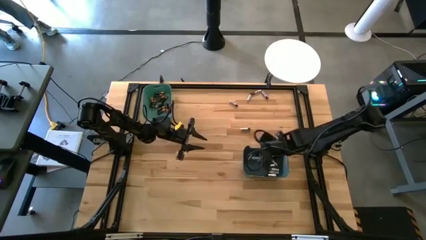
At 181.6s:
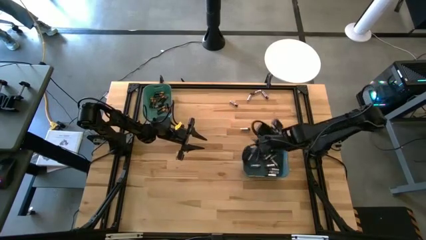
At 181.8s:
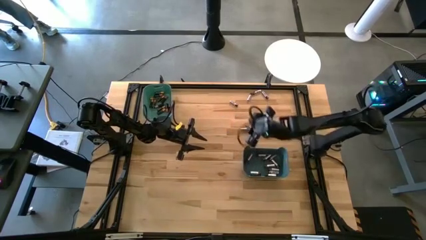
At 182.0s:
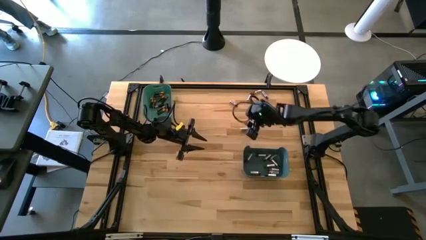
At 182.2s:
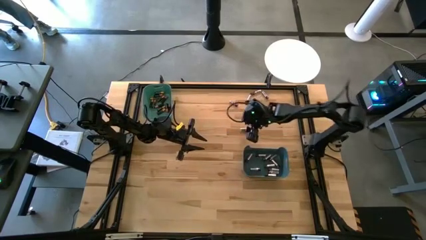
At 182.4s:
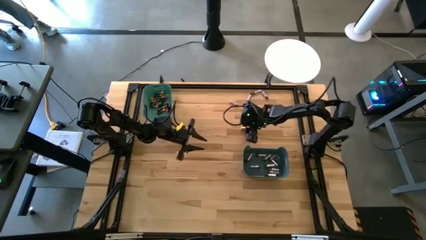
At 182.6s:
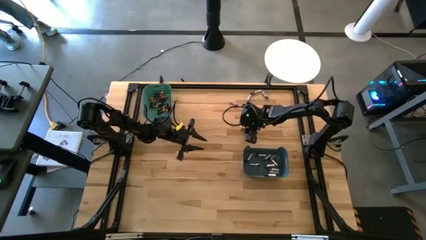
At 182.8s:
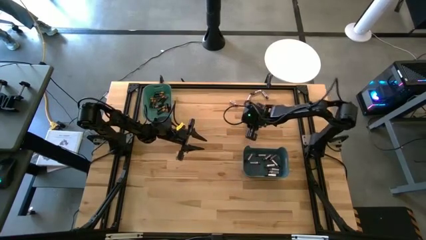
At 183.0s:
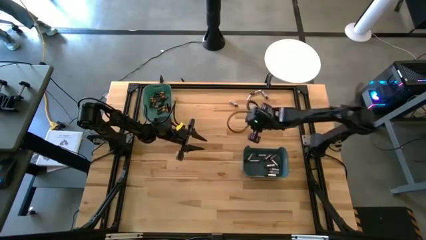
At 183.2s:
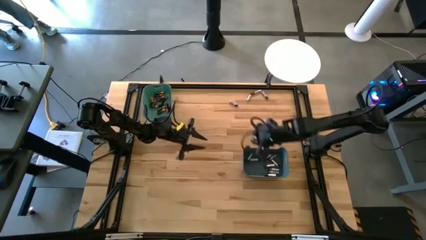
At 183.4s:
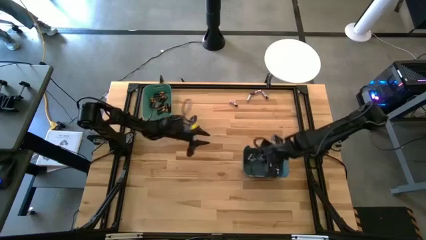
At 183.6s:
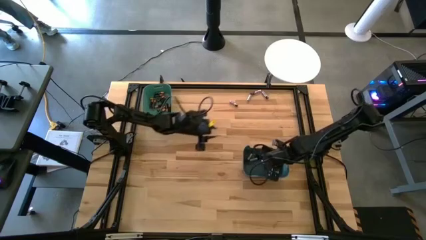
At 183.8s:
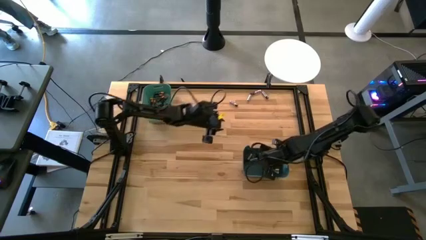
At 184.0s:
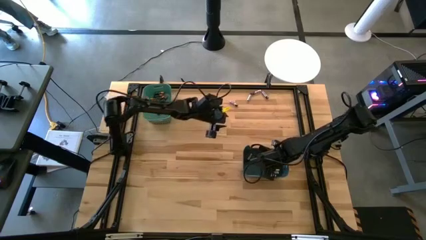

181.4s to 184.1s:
Task: Sort batteries
Put the silver battery into the blue bin

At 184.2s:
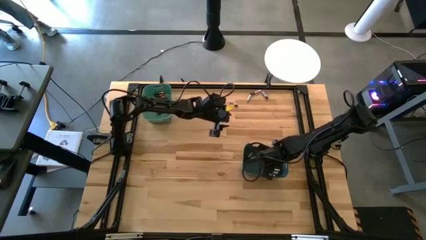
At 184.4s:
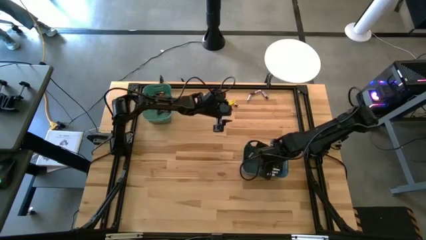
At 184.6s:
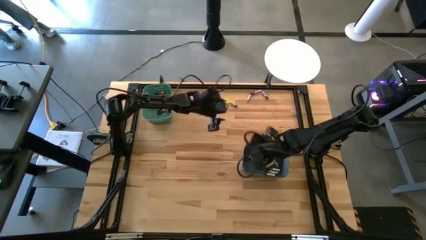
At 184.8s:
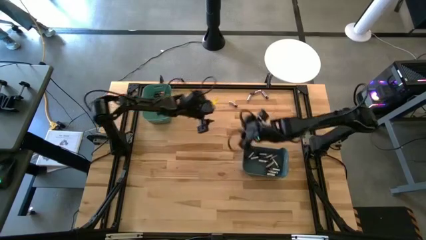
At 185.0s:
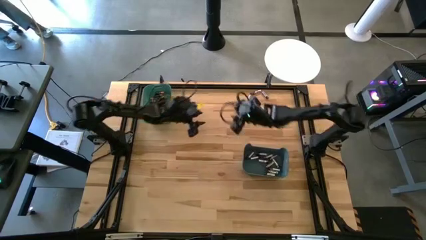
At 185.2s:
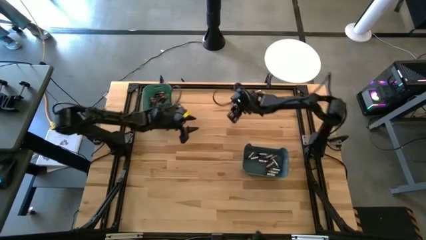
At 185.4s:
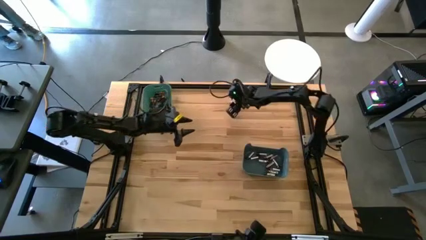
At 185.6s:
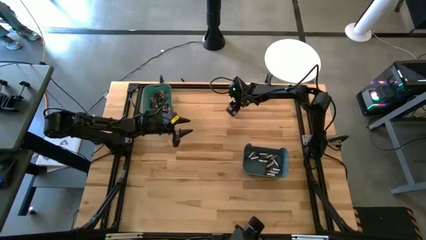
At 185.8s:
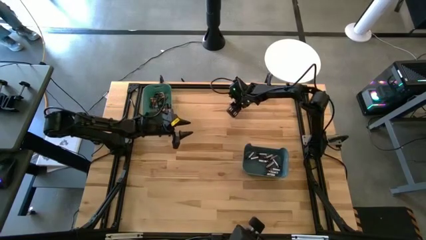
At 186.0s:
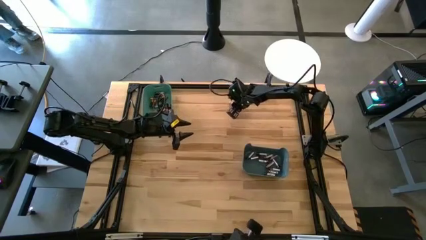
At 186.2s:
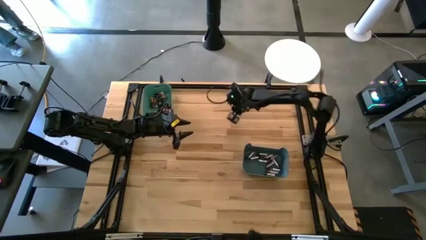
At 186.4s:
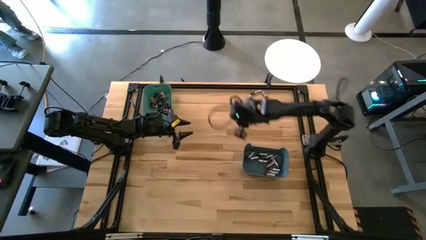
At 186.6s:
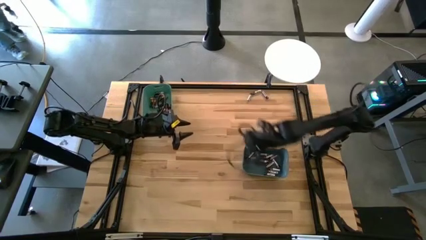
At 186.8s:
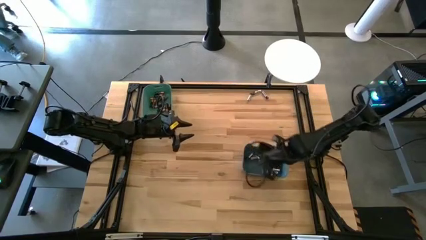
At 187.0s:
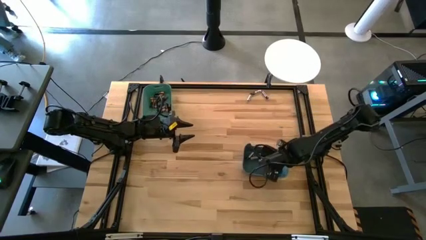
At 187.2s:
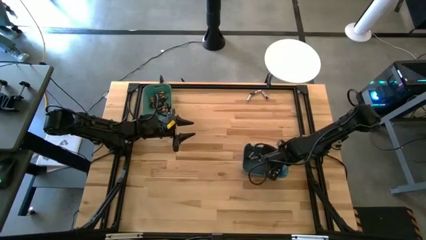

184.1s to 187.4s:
Put the silver battery into the blue bin

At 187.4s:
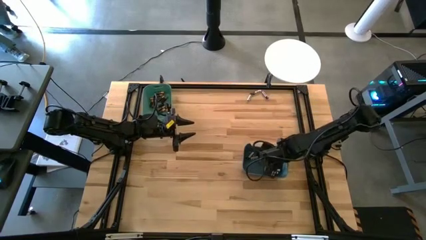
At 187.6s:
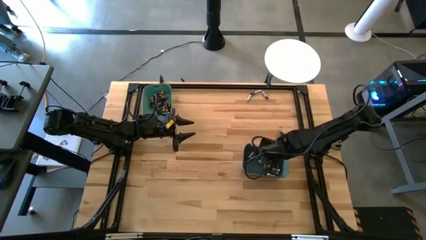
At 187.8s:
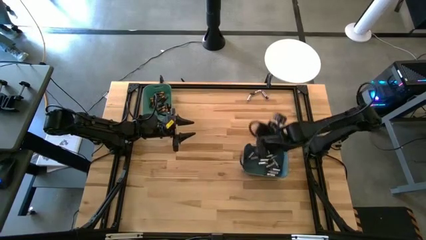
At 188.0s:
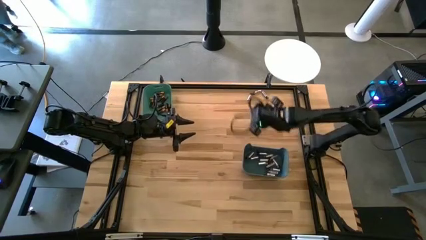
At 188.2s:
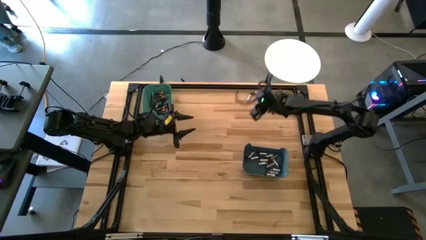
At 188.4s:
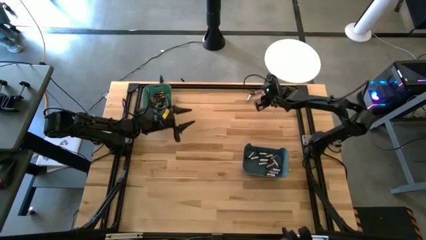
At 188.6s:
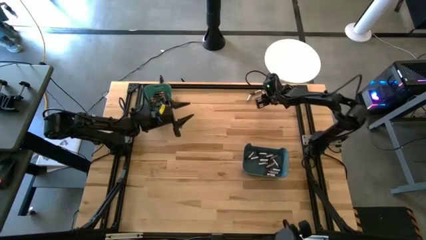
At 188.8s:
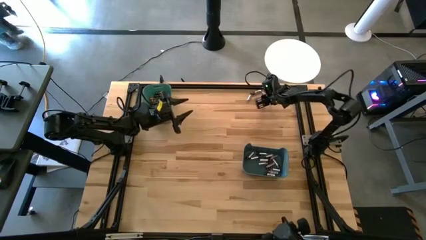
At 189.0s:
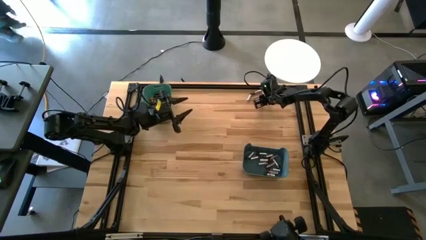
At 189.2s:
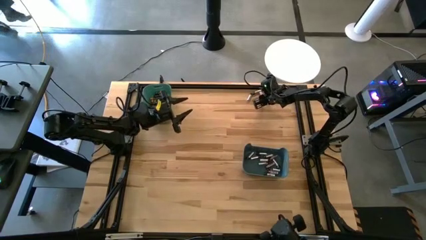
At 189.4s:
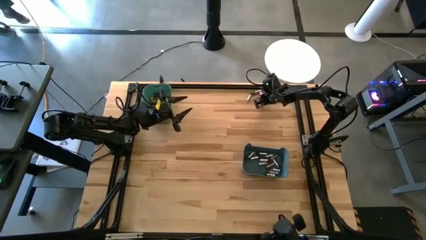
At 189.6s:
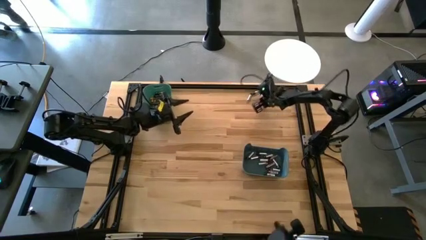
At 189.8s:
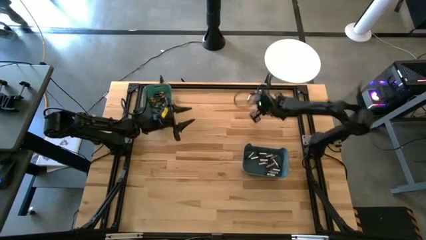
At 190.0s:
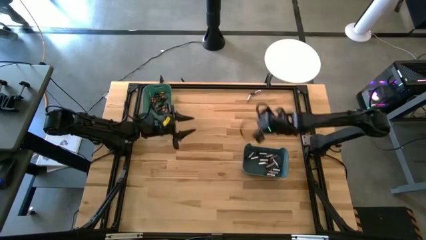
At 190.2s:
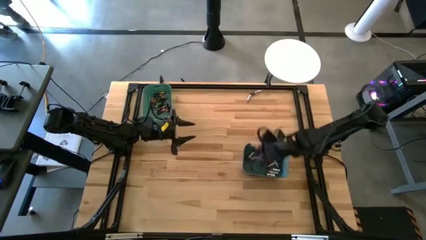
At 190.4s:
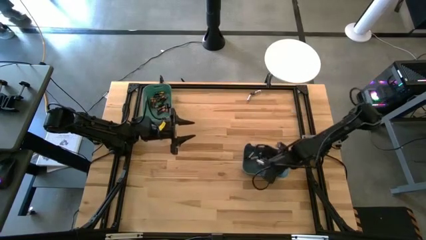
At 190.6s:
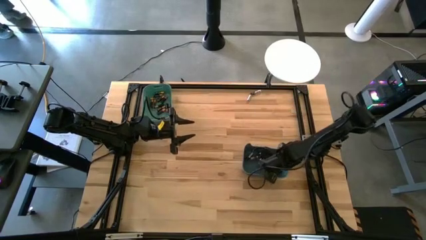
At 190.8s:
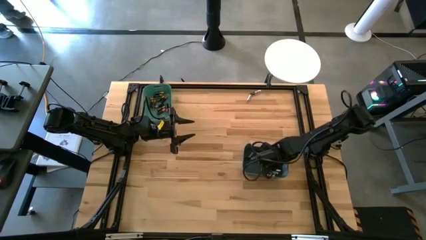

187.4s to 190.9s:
Put the silver battery into the blue bin

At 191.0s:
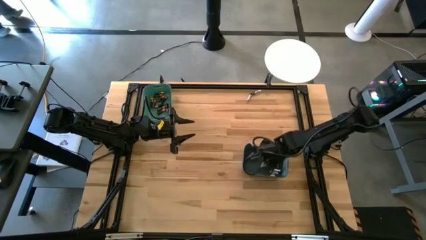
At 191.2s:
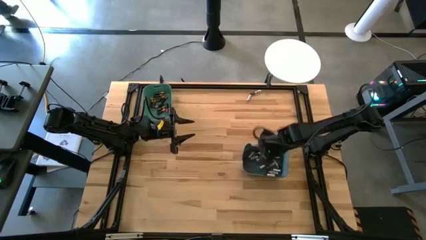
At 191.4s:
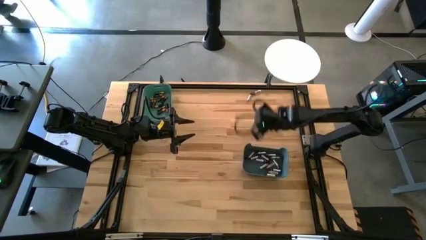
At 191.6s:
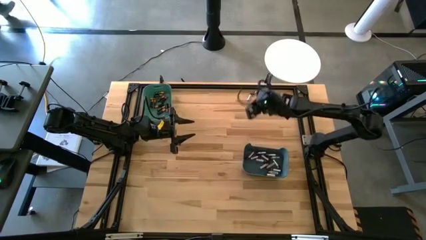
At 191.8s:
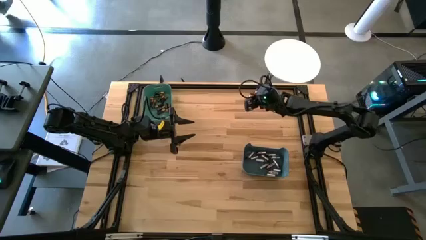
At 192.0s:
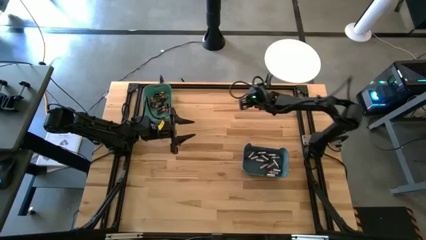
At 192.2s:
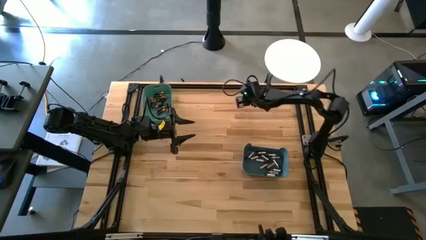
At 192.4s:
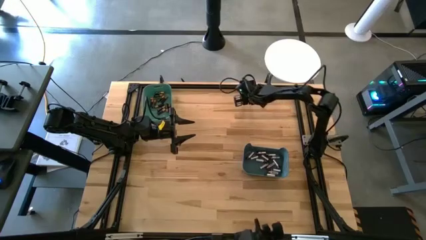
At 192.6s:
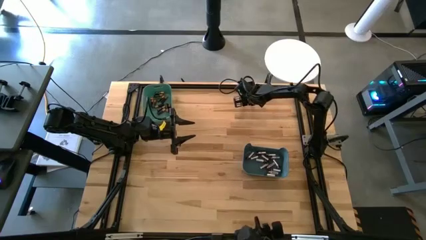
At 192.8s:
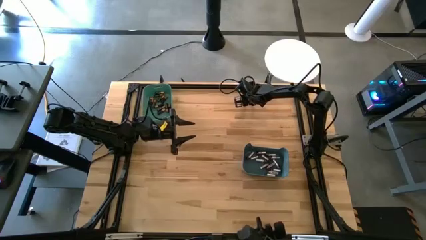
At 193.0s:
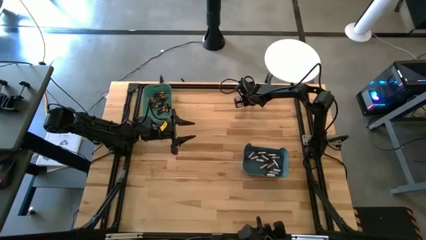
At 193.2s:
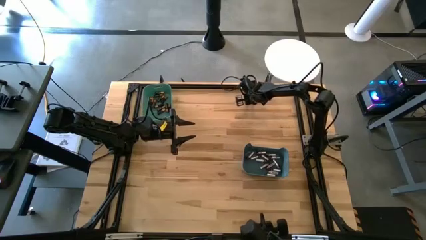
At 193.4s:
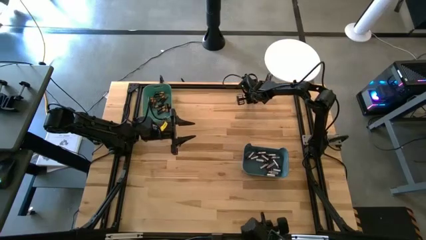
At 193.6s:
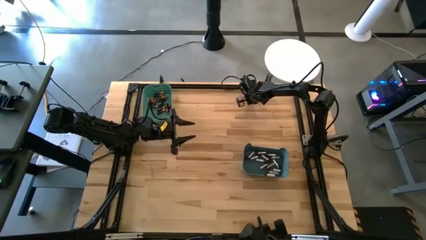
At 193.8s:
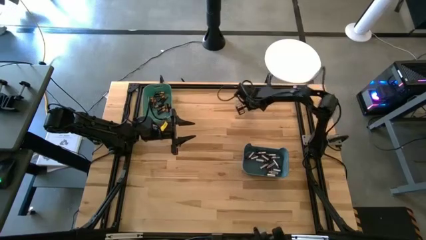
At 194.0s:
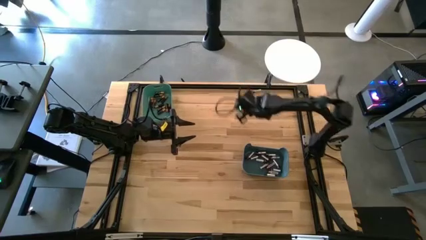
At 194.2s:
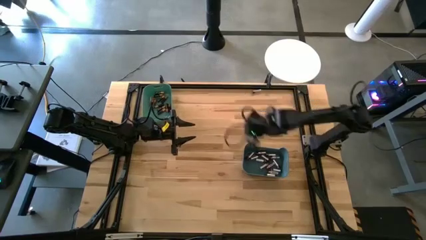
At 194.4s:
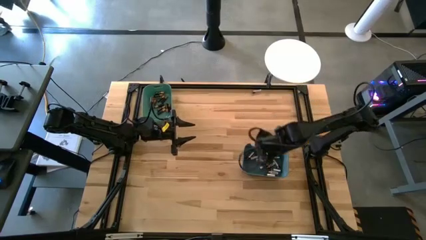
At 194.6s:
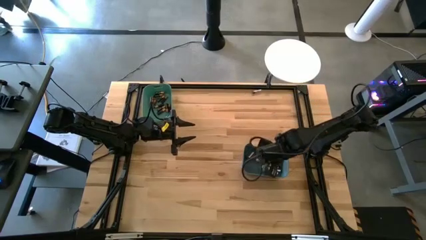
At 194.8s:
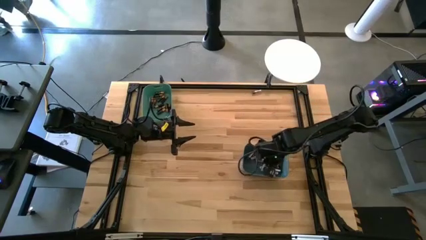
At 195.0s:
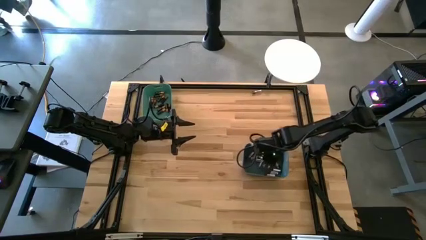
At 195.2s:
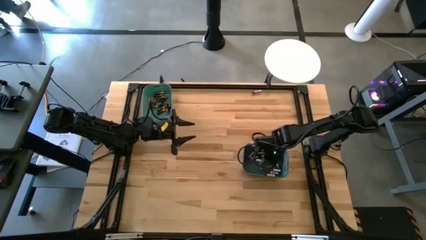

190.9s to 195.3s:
Put the silver battery into the blue bin

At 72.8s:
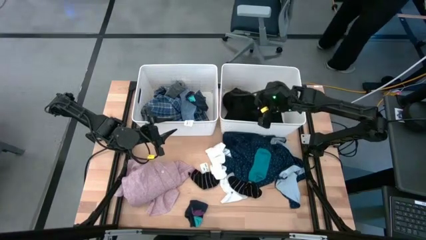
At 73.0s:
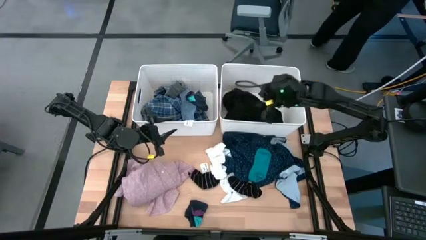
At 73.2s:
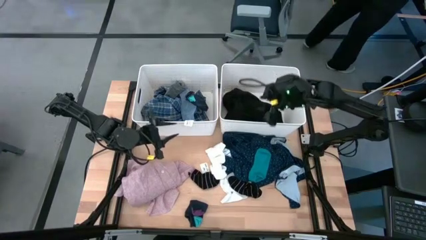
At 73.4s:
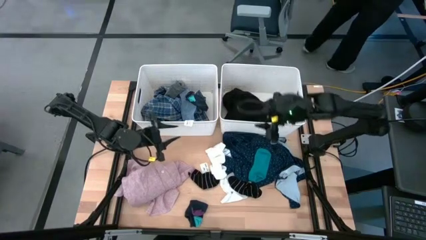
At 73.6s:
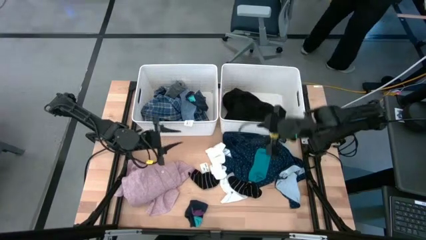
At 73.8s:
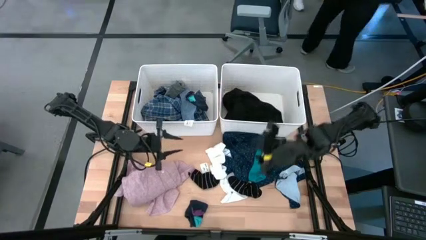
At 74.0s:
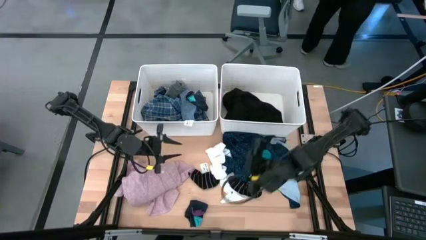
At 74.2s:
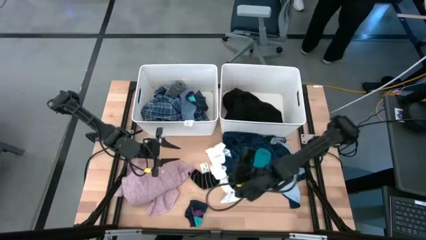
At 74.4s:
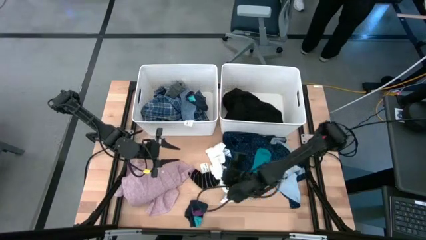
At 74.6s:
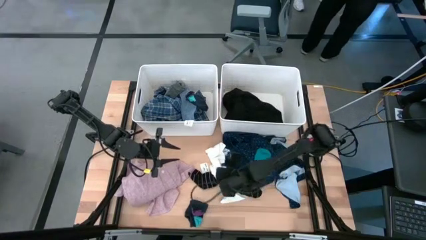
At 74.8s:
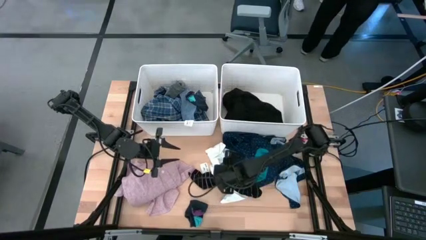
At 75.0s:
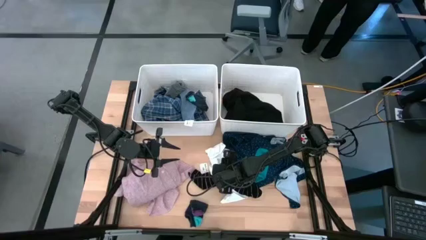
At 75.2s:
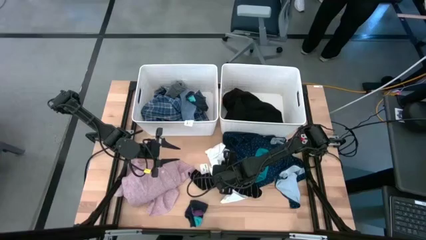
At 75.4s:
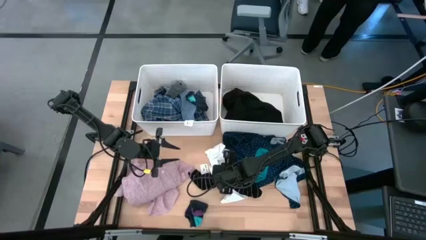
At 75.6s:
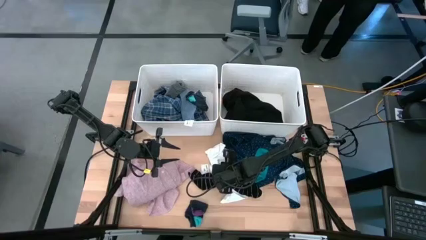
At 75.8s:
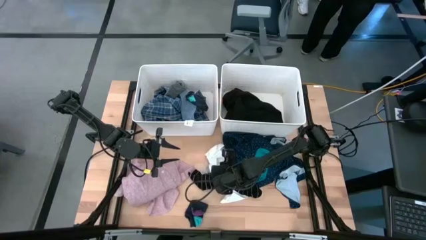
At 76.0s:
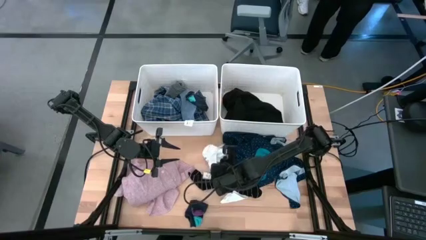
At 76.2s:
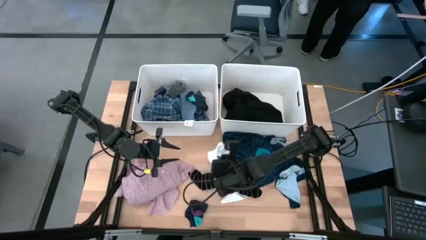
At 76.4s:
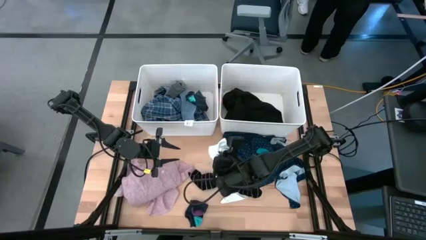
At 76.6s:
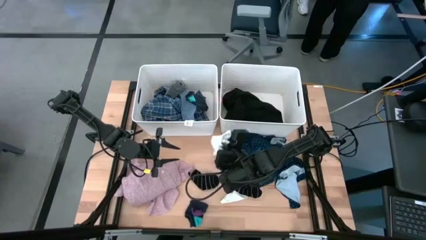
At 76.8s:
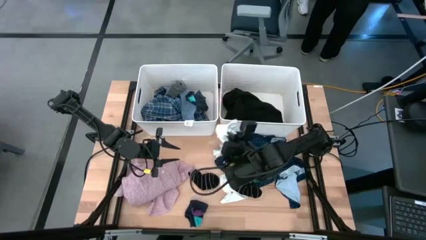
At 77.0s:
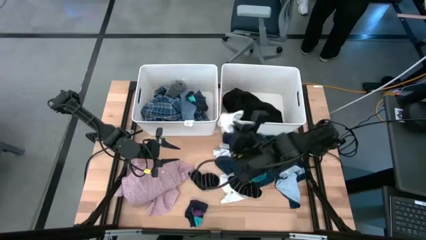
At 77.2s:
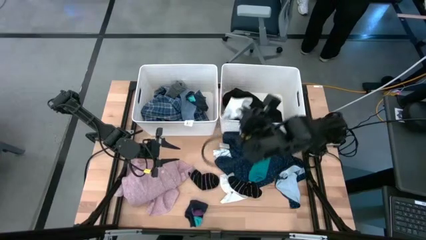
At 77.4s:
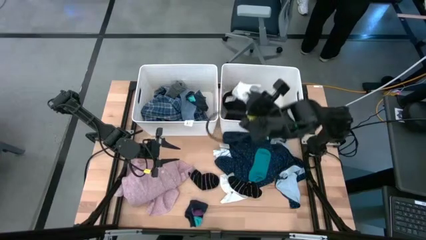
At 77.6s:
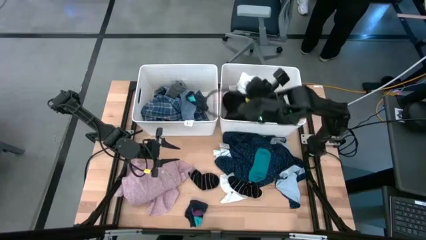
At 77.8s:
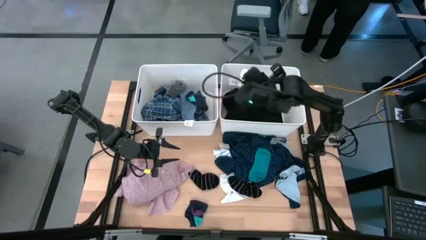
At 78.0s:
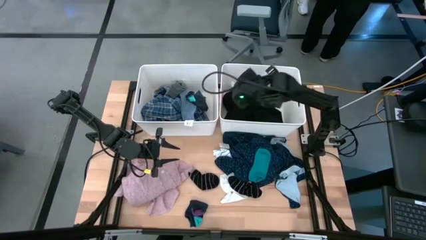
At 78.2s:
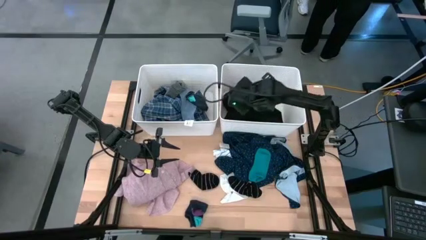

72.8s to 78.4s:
Task: Sort clothes
Put the top white sock into the right white bin
